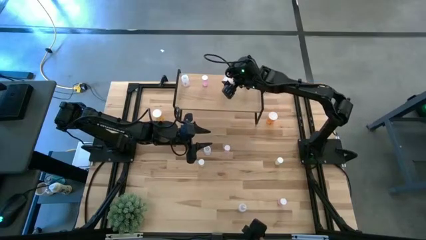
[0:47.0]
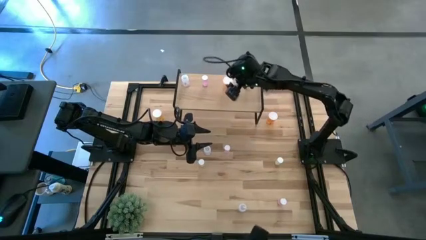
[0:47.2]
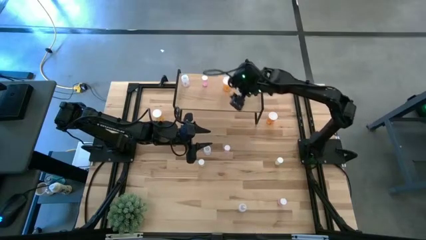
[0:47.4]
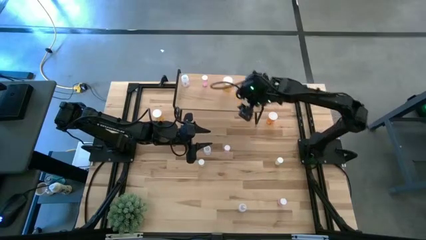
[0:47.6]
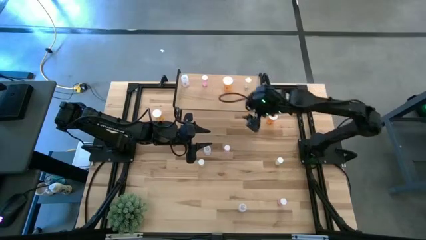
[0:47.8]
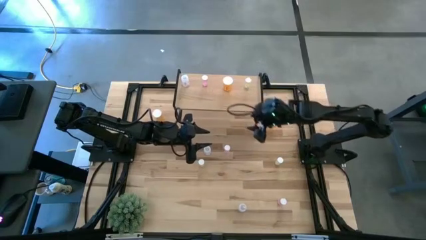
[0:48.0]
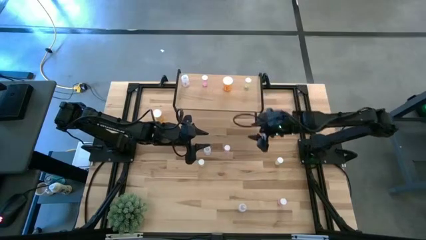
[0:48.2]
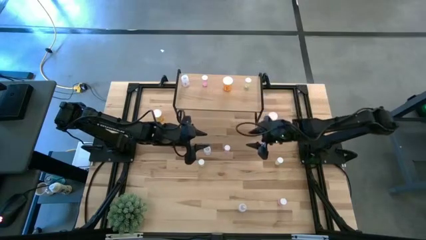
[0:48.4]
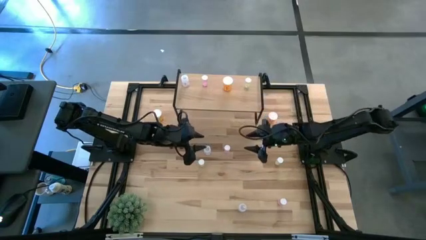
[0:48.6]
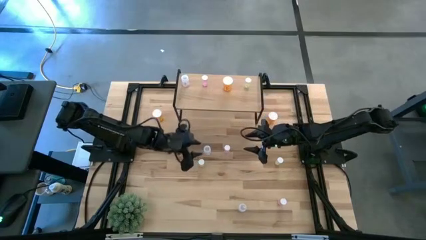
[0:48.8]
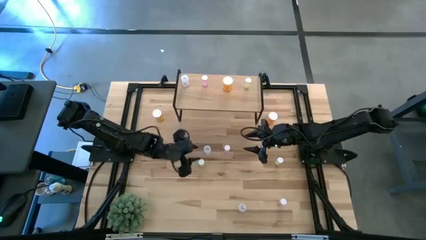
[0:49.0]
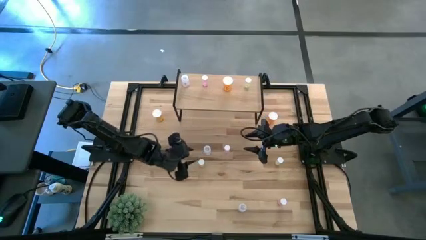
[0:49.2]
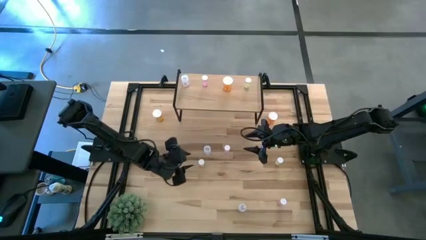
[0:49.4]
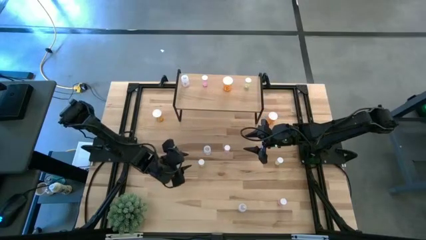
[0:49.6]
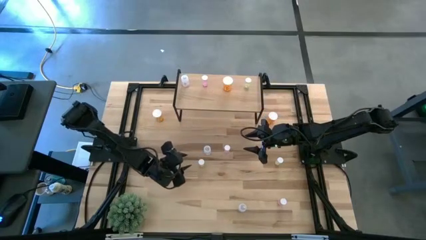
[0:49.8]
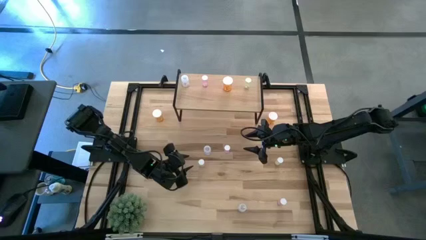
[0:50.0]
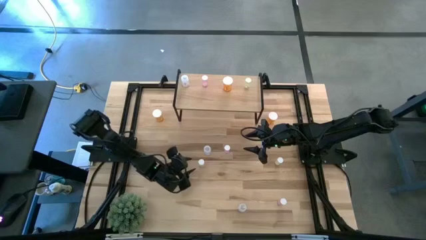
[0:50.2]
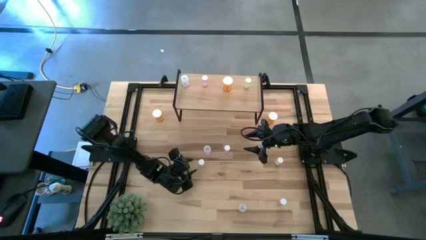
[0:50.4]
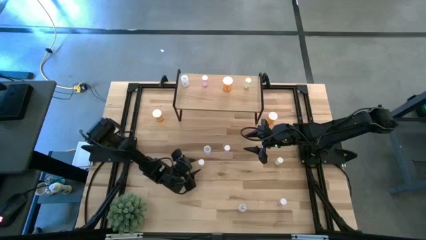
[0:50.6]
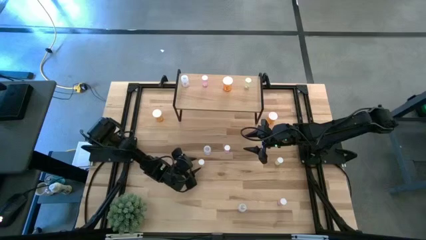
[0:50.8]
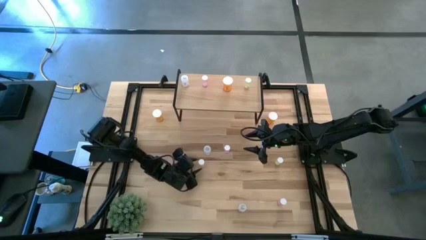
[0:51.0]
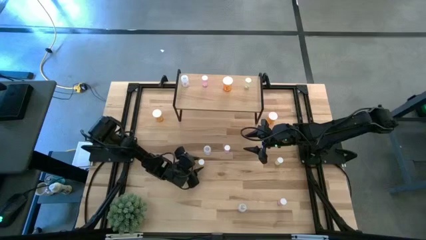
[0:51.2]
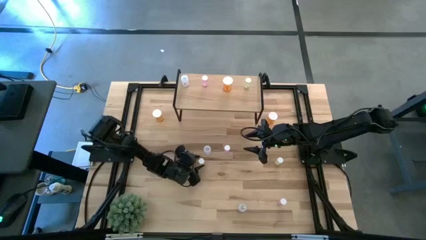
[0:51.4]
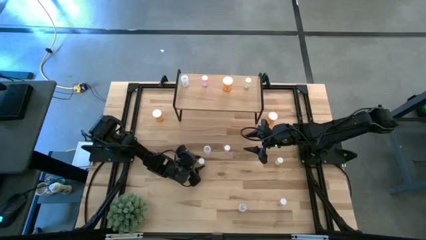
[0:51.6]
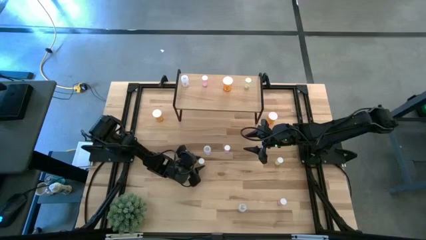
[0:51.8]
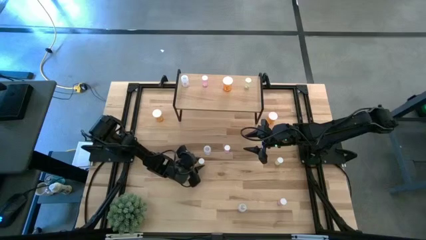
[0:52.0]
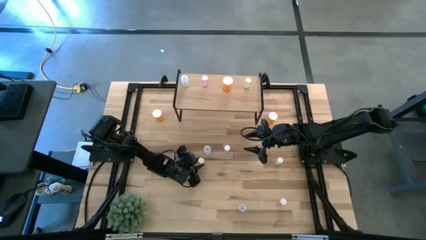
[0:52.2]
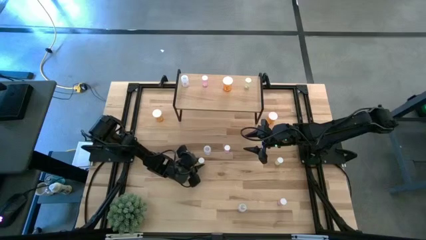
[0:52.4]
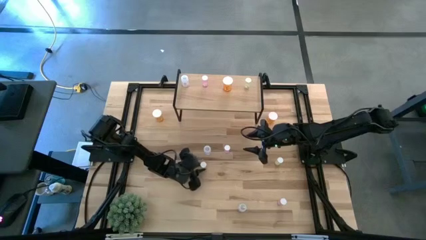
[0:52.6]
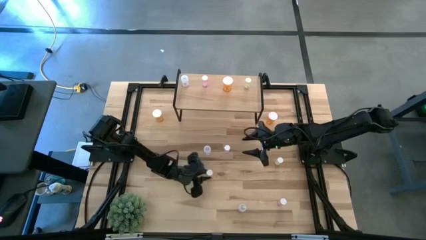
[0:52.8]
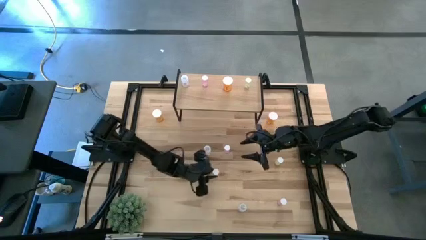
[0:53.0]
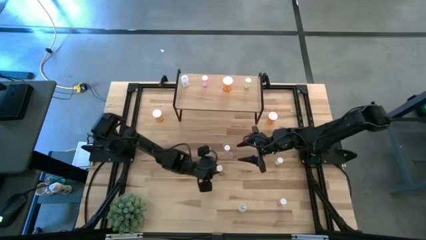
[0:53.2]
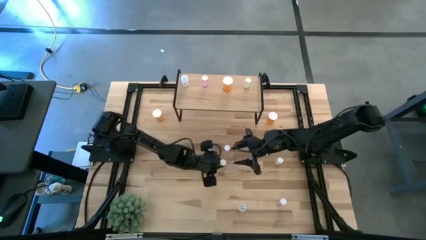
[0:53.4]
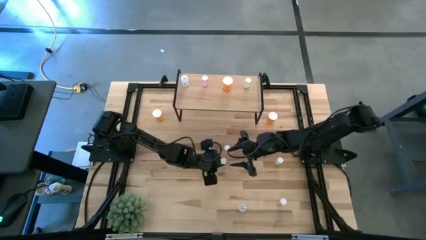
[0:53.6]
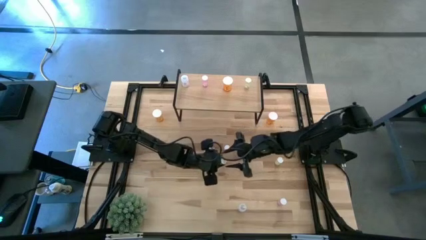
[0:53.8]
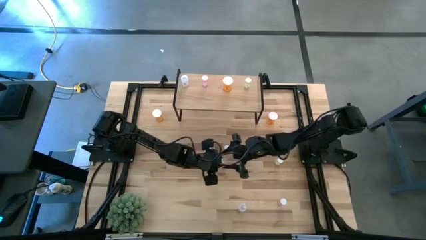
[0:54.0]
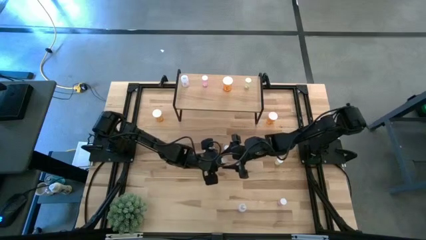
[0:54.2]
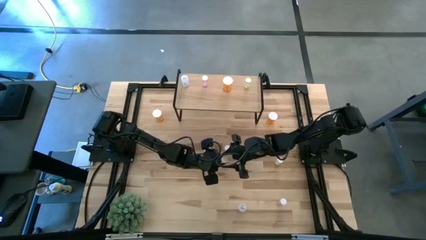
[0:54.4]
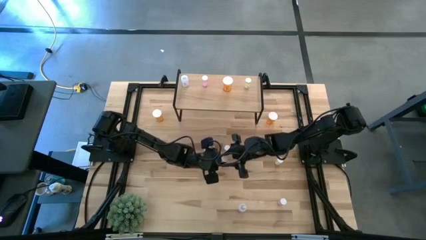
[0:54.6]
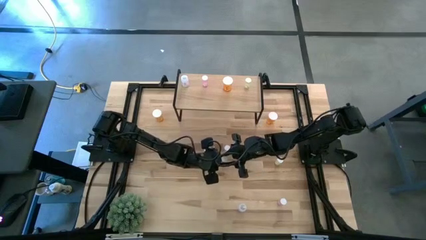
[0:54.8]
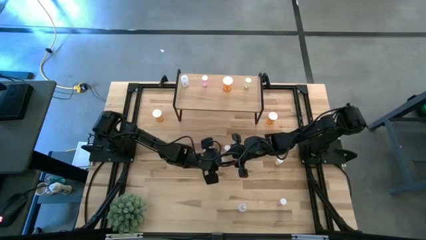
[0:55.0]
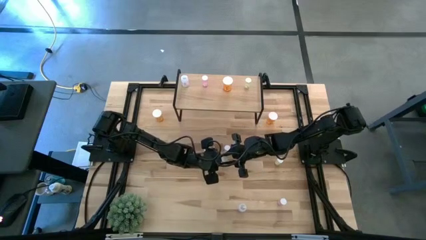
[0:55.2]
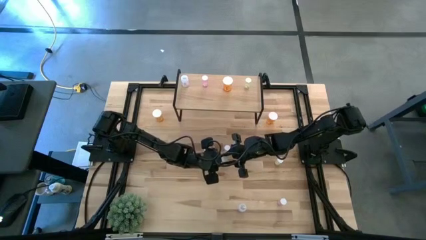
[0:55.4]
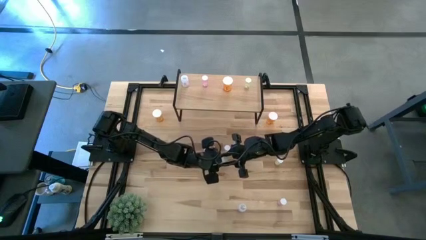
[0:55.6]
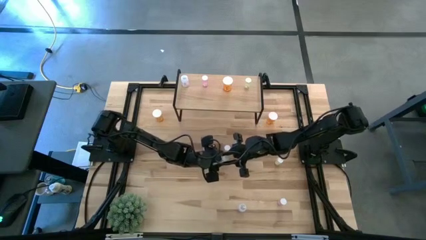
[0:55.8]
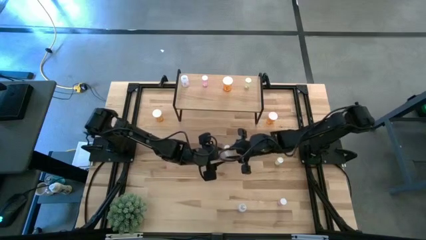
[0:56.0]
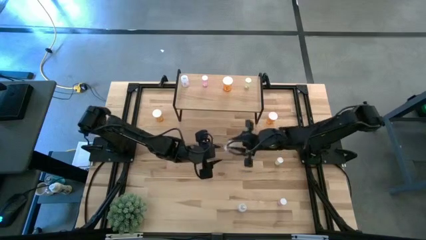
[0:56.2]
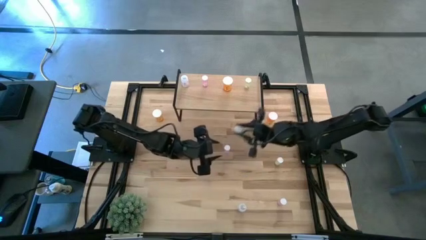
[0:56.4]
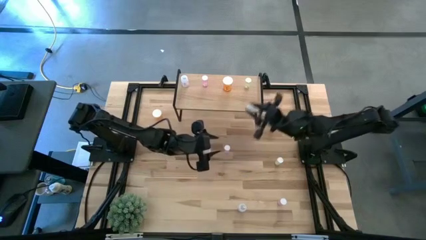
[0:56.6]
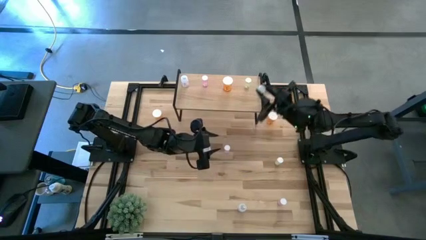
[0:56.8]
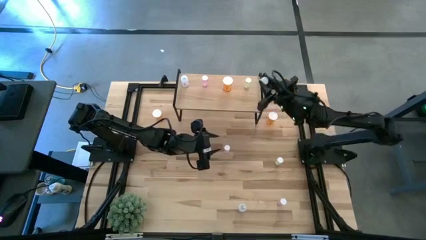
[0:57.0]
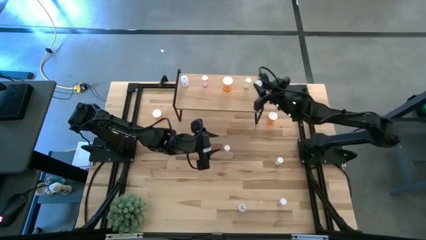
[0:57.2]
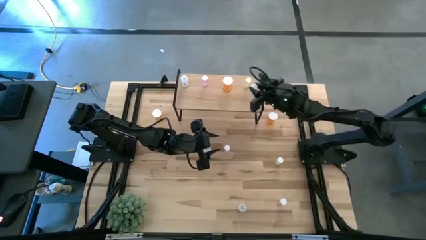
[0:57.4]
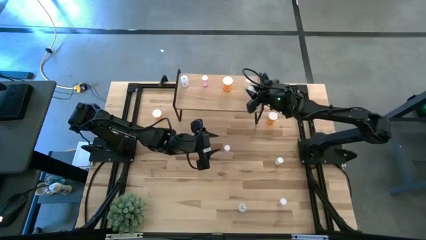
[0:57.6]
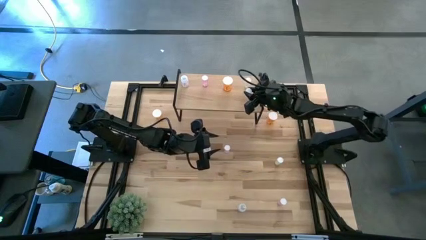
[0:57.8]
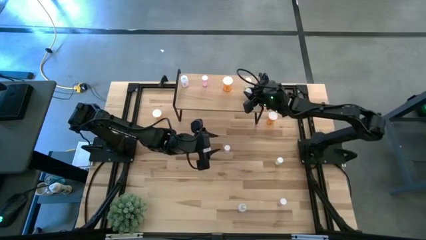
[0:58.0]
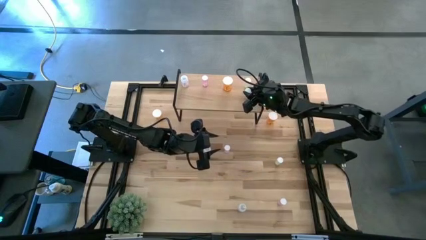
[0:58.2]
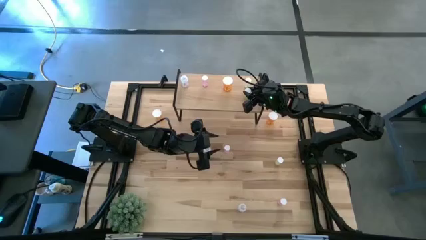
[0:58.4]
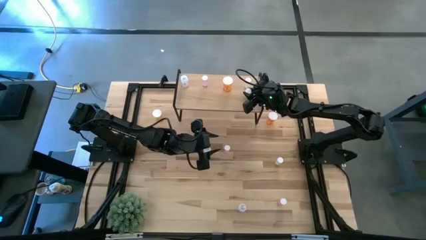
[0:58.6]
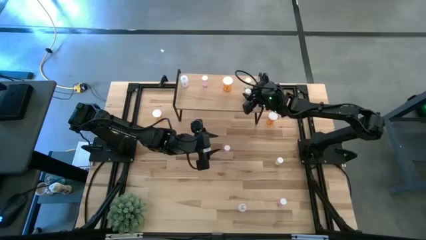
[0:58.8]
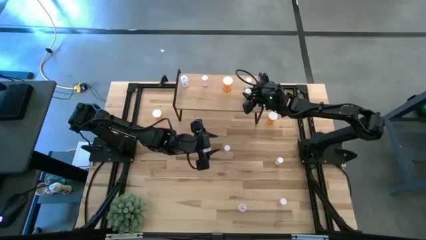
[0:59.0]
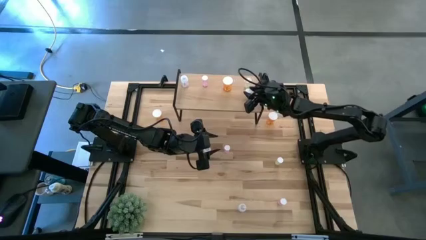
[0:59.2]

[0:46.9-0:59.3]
Task: Pick and place medicine bottles onto shelf by color
Put the left yellow pill bottle on the shelf aligned with the other yellow pill bottle
